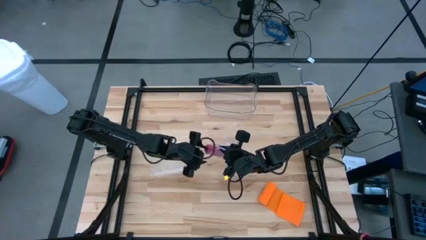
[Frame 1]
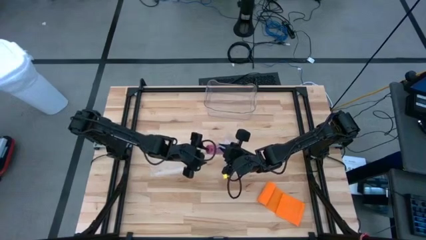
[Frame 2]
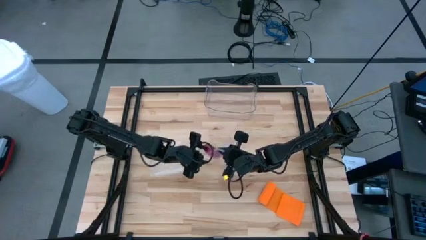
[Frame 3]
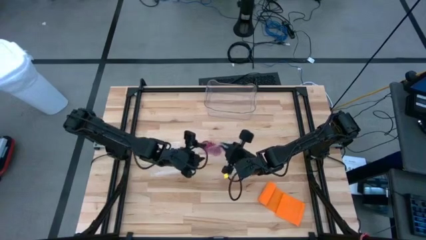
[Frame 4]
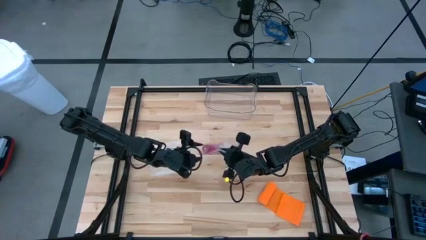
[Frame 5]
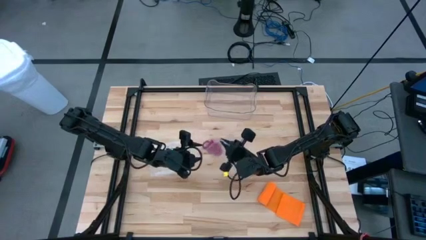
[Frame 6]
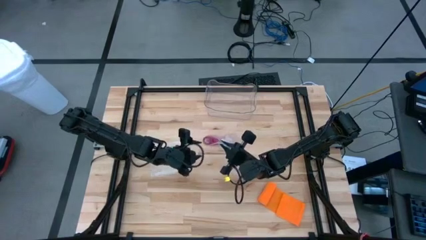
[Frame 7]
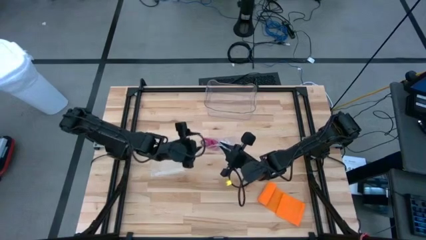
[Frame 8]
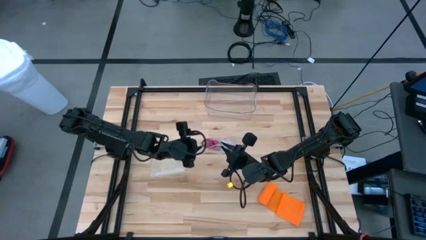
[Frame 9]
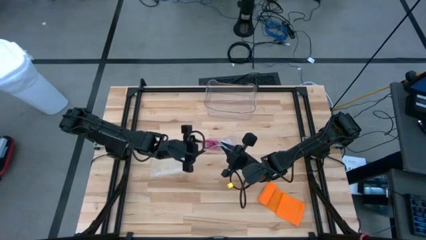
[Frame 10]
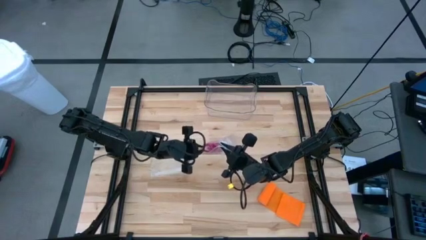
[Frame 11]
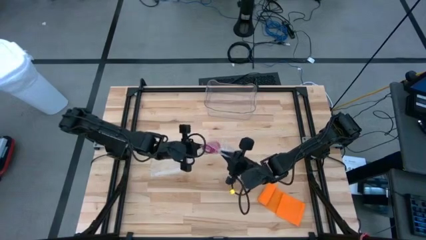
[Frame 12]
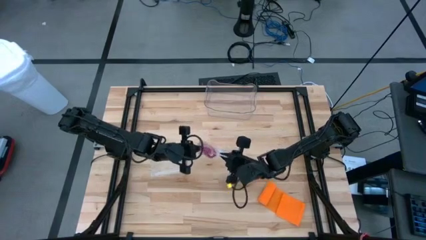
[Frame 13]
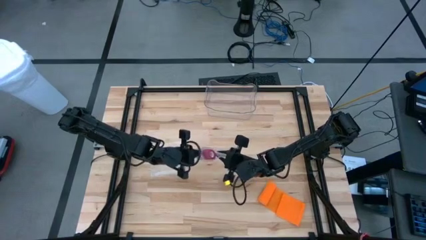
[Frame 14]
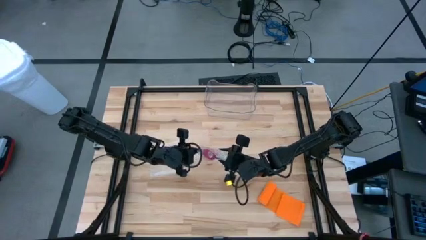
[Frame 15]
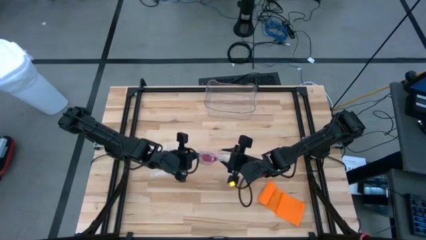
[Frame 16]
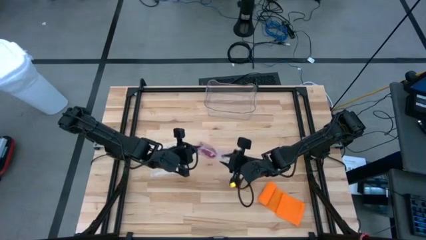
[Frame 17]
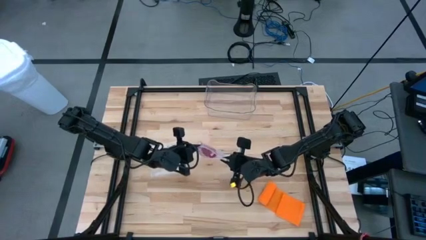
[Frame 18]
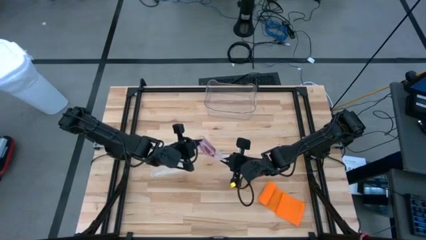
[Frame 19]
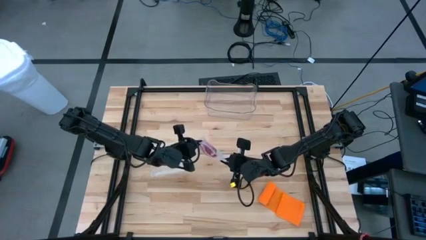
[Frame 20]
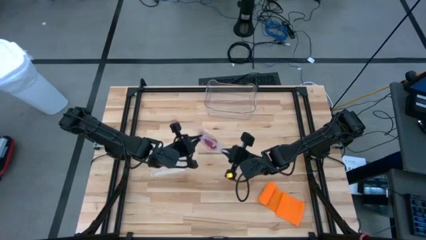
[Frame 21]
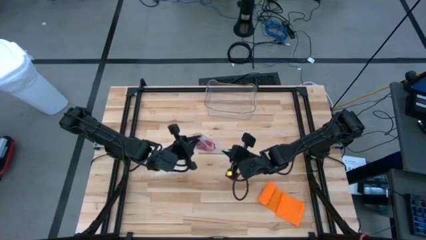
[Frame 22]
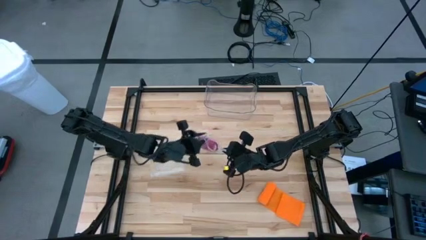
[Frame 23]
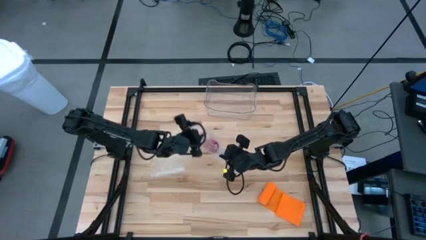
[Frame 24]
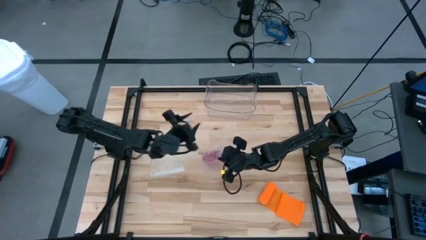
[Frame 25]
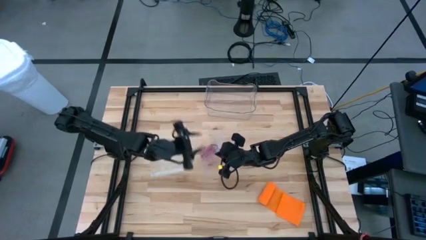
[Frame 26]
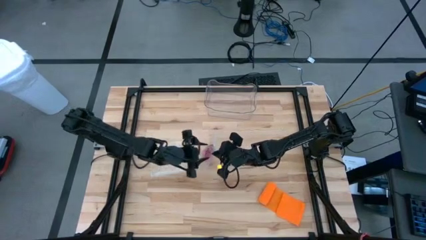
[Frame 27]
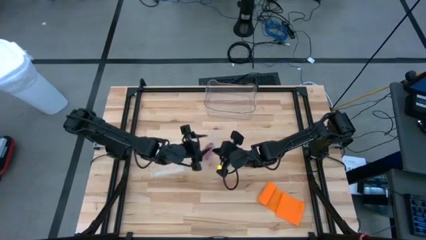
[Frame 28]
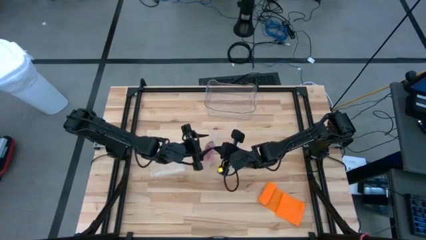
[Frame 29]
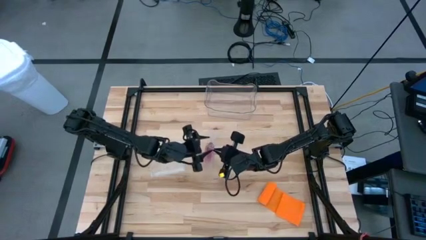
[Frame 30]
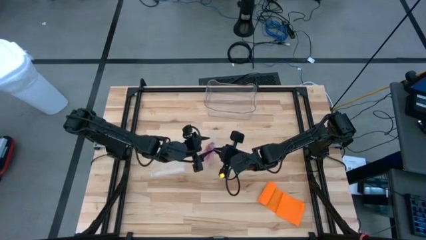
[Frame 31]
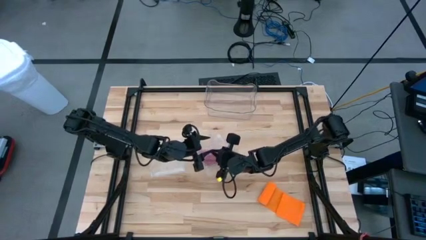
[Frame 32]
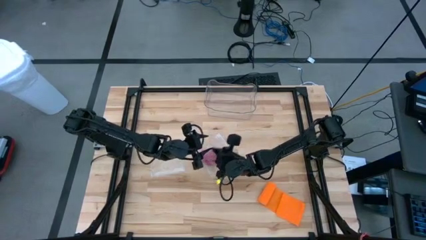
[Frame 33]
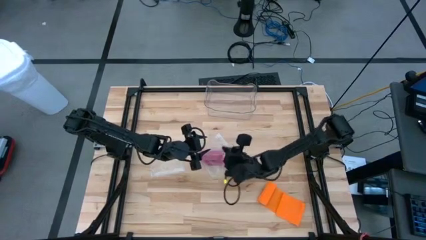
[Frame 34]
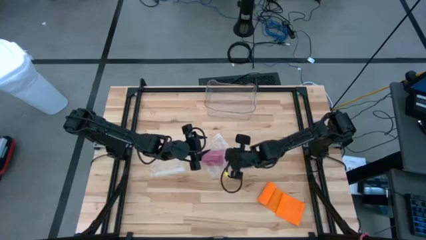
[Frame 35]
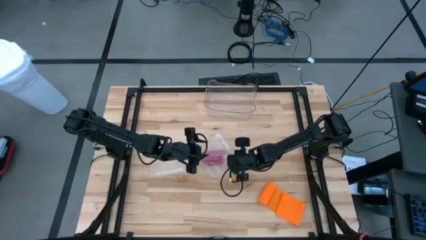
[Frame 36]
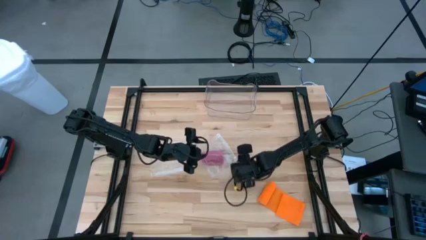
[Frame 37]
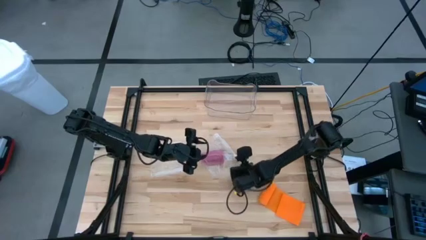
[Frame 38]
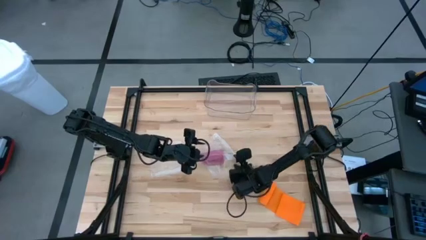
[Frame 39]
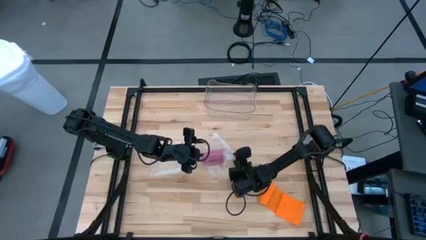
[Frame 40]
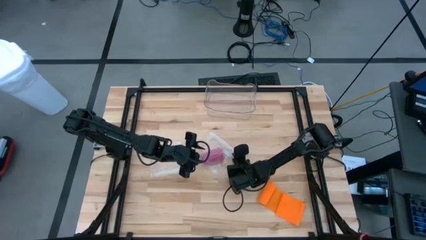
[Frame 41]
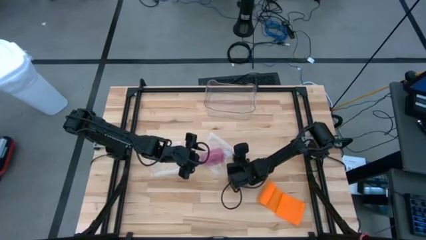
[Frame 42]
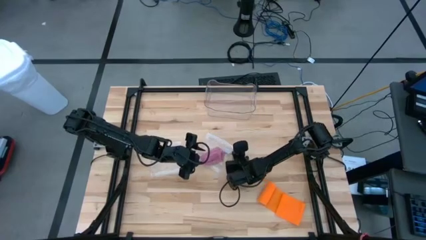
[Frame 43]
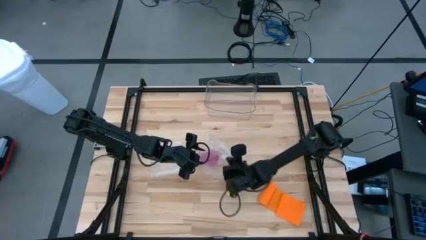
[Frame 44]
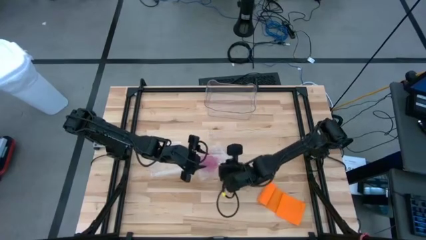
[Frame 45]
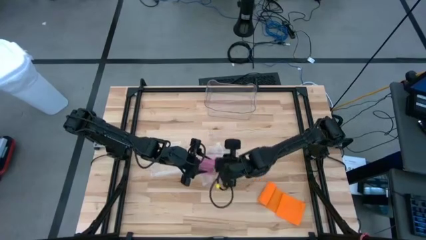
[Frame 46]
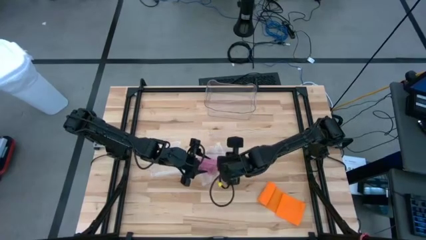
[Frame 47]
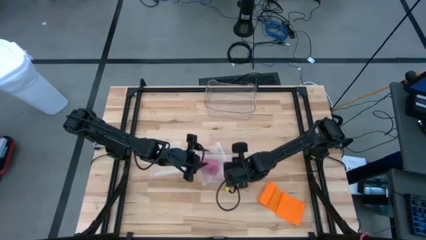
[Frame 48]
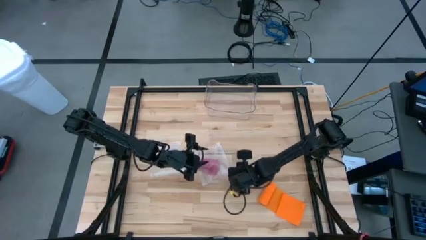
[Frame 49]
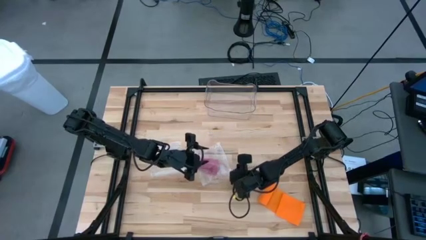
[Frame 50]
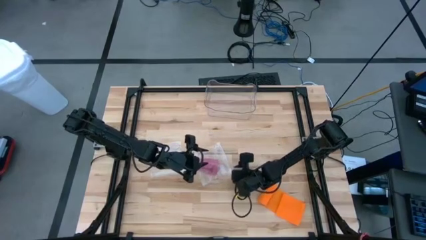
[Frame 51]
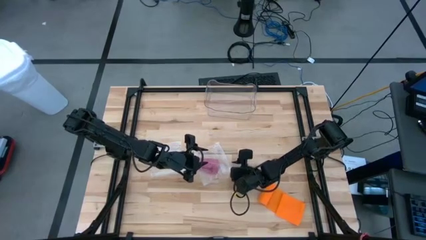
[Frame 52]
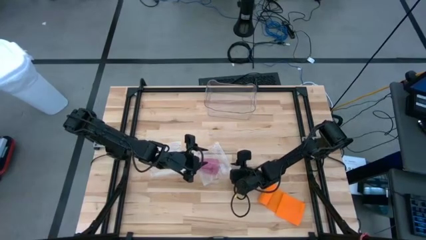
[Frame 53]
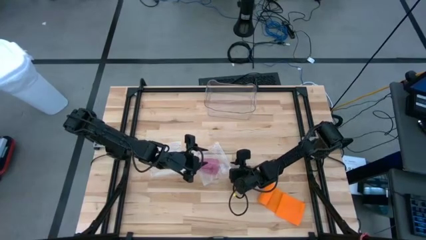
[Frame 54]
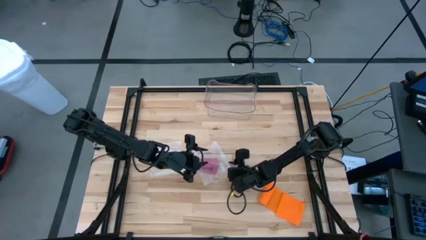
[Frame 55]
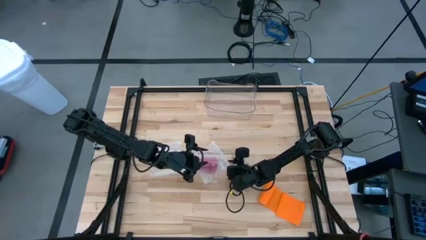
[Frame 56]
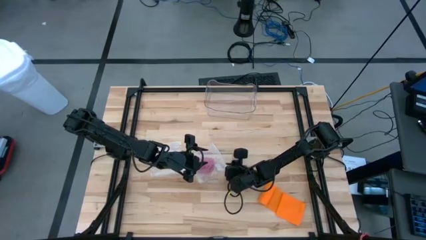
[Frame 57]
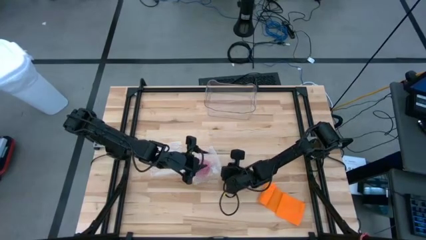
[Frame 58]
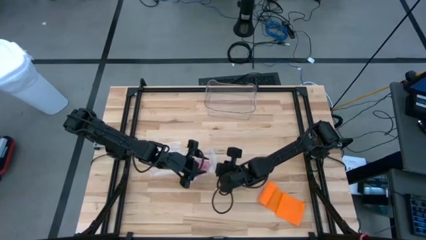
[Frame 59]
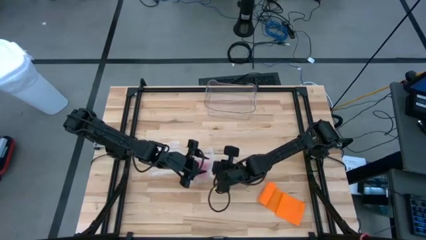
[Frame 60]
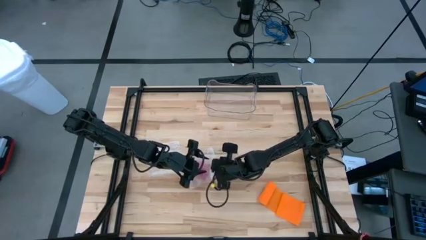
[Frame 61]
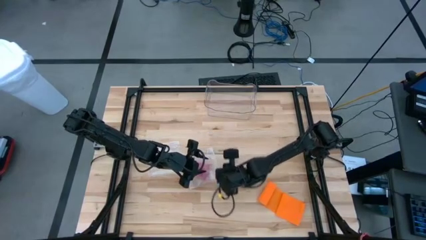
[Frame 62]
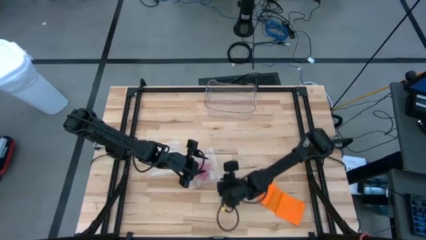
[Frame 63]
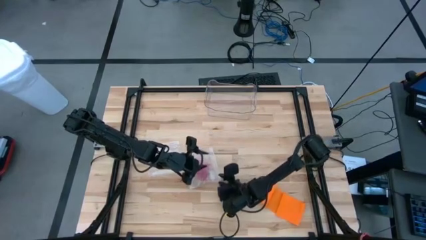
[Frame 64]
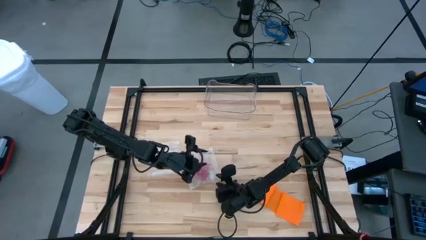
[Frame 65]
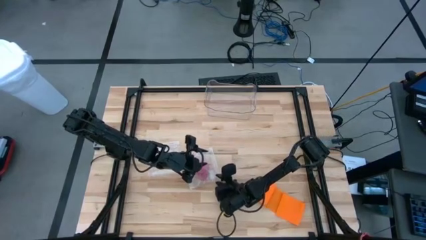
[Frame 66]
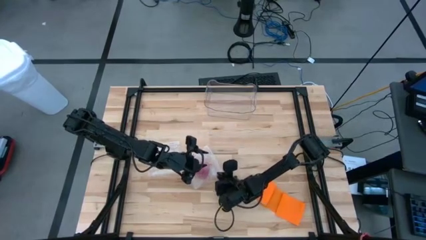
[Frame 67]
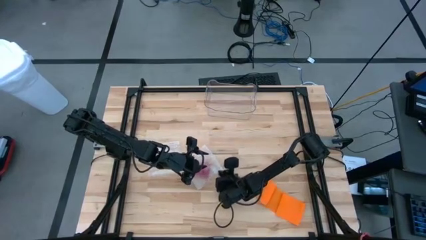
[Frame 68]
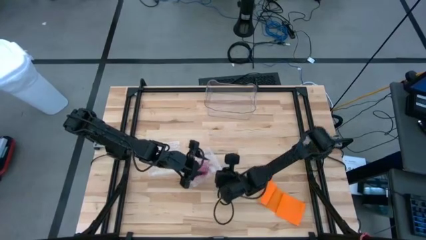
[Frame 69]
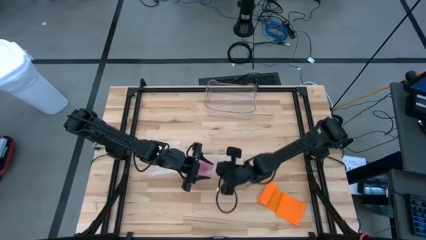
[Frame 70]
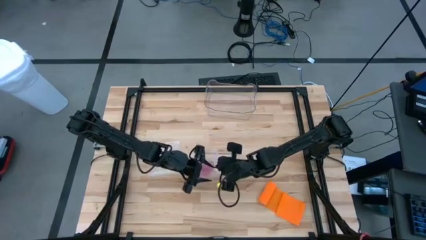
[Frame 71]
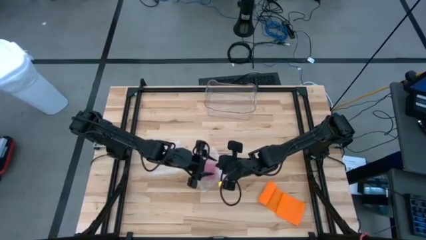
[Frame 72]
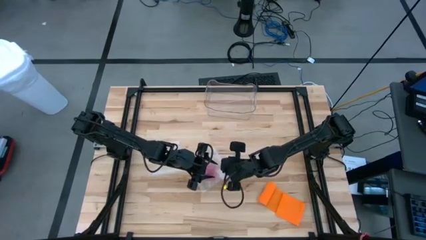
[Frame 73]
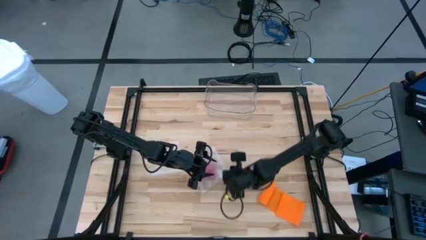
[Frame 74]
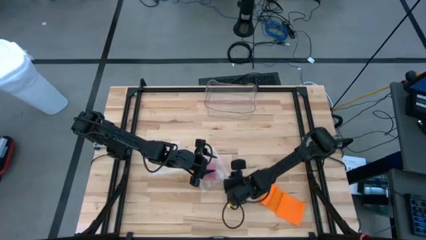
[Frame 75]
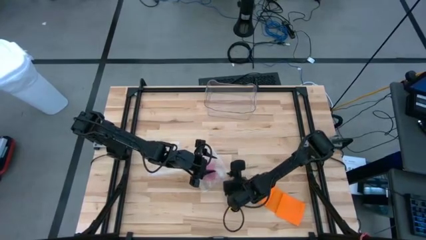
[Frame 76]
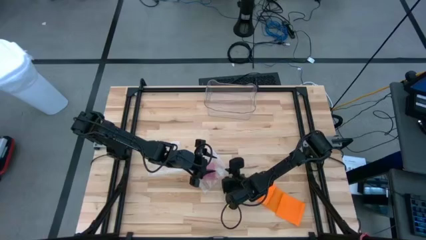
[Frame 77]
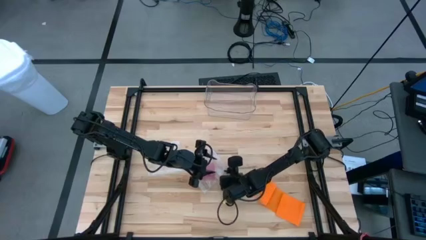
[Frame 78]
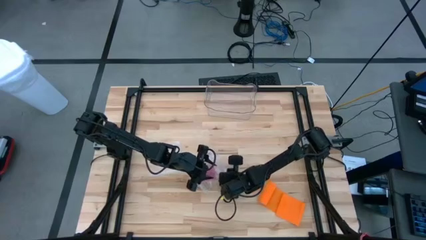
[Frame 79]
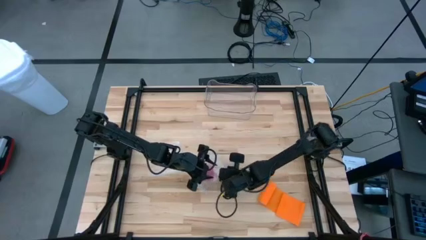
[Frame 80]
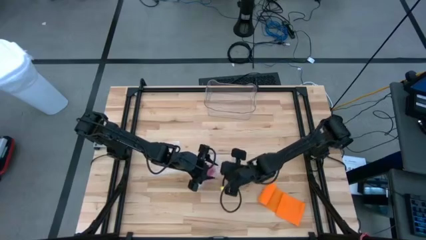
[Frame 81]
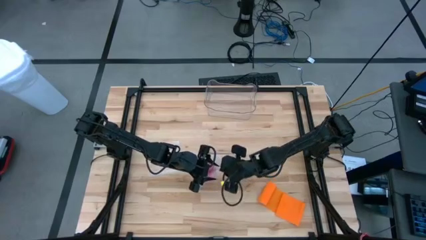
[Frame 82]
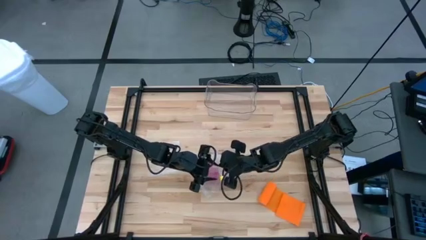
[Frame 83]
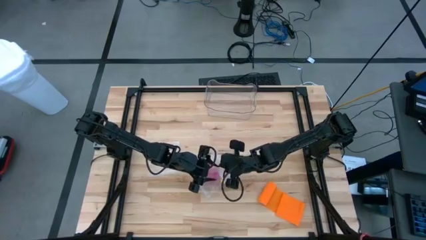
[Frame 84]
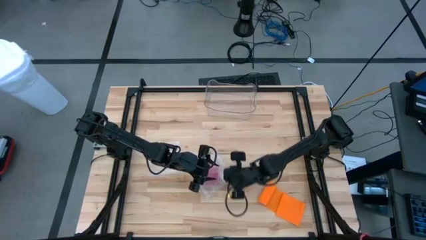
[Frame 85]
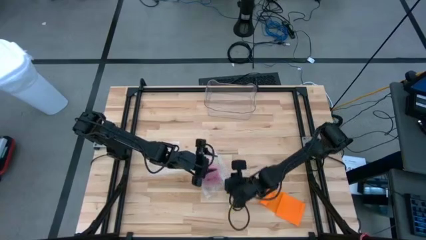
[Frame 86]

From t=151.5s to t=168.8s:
Task: Roll bandage
Close the zip bag
